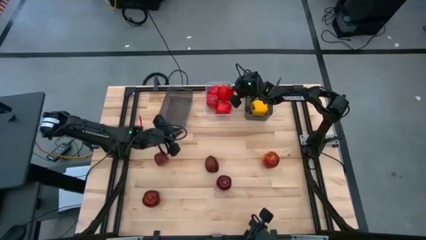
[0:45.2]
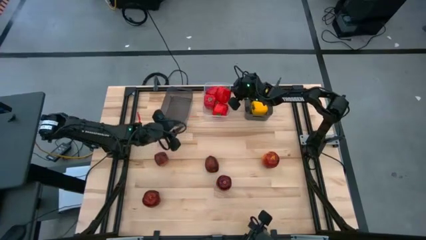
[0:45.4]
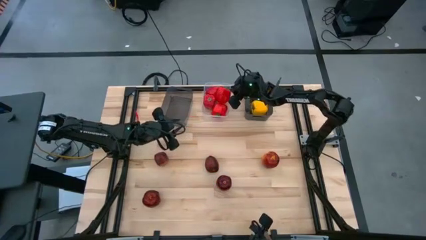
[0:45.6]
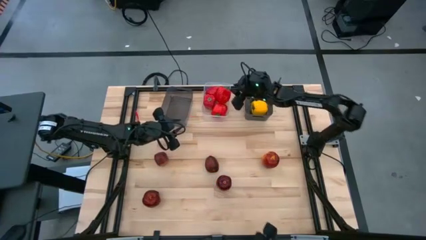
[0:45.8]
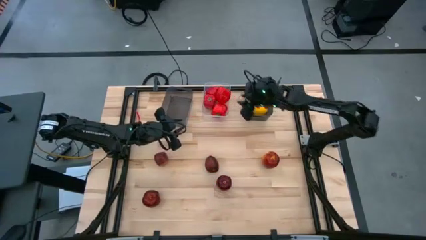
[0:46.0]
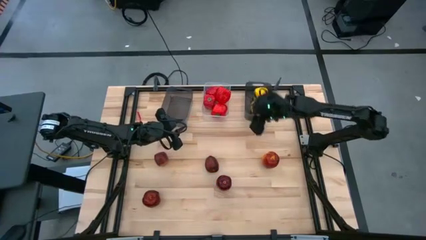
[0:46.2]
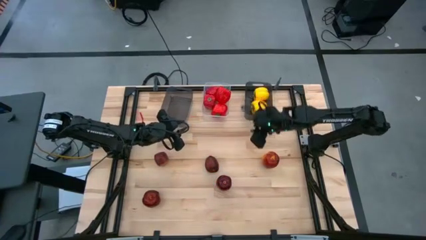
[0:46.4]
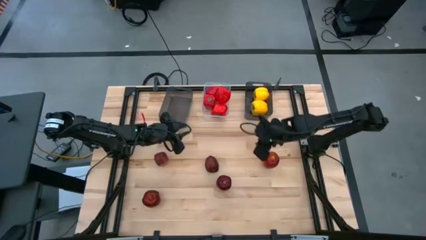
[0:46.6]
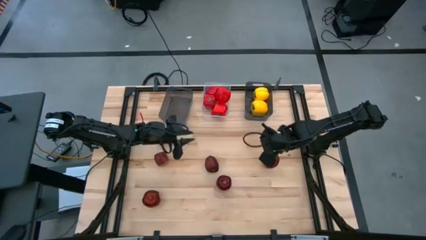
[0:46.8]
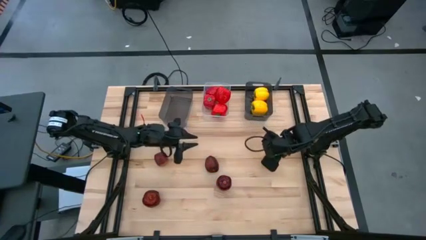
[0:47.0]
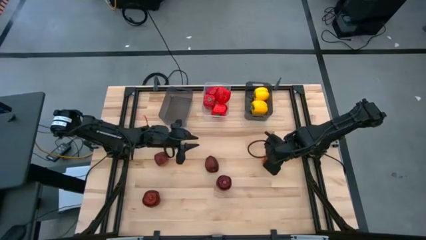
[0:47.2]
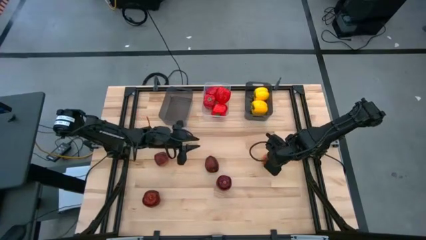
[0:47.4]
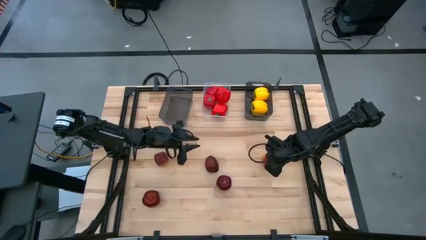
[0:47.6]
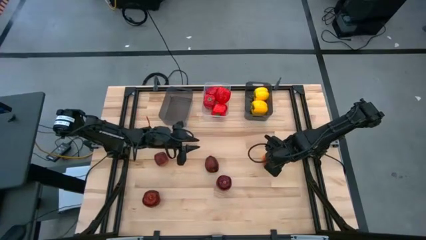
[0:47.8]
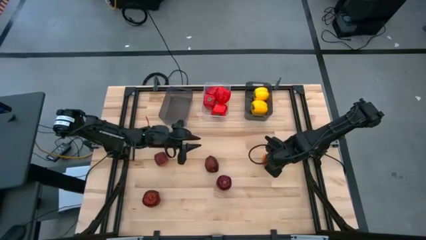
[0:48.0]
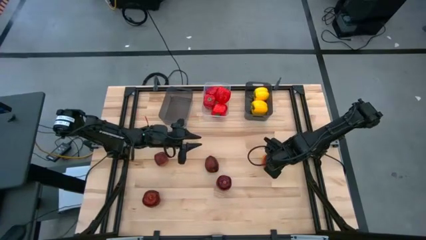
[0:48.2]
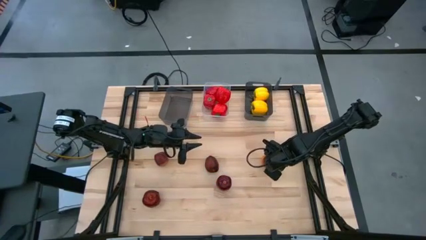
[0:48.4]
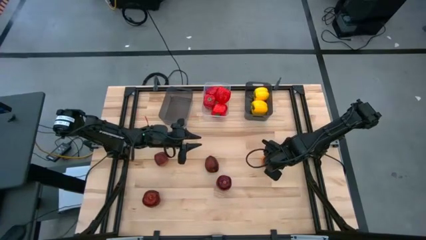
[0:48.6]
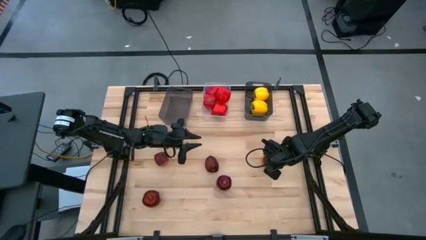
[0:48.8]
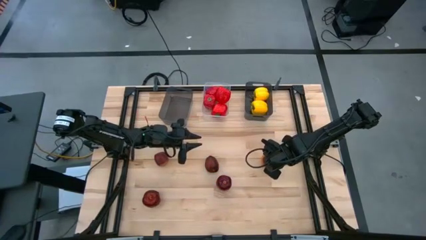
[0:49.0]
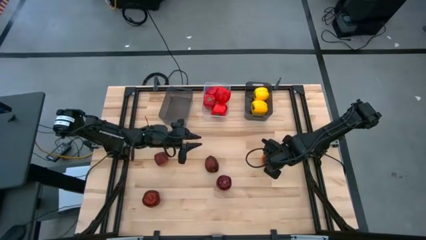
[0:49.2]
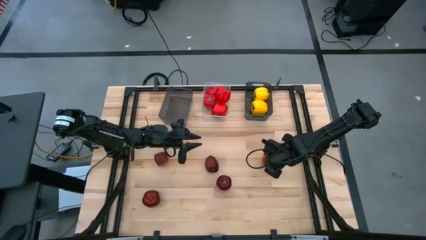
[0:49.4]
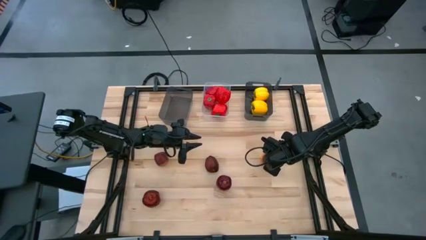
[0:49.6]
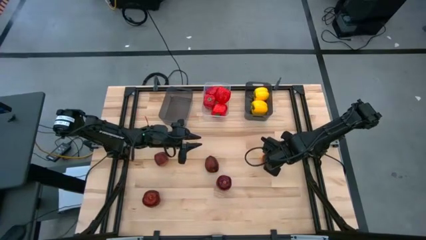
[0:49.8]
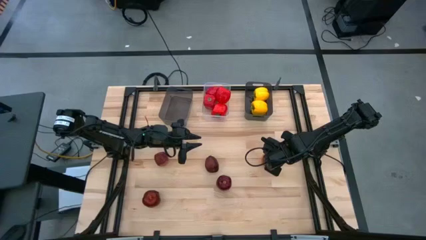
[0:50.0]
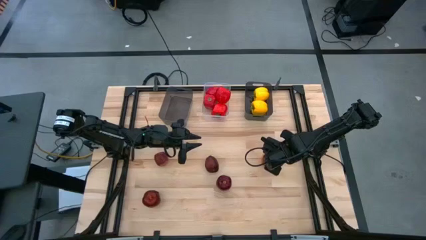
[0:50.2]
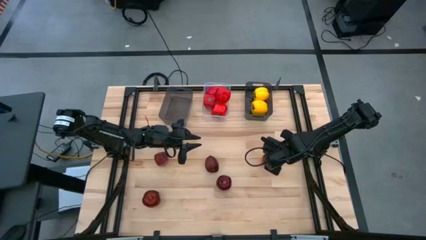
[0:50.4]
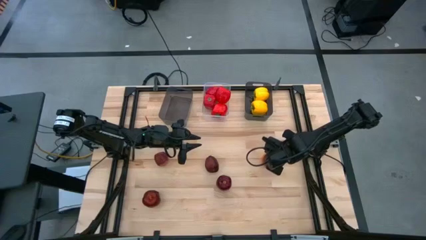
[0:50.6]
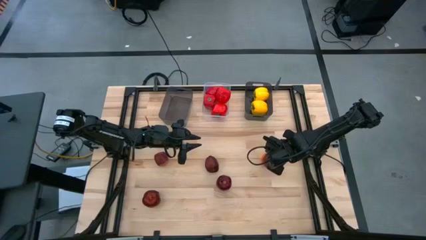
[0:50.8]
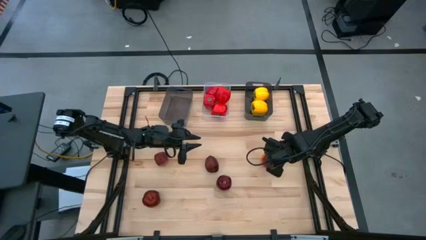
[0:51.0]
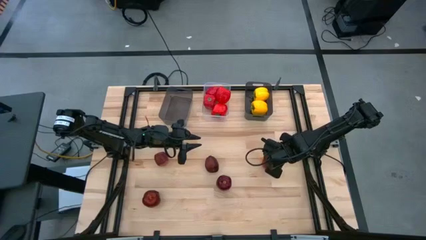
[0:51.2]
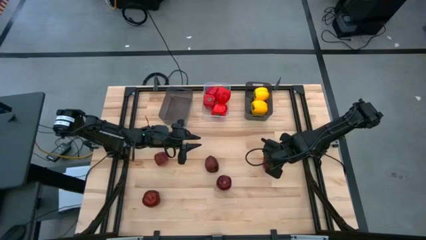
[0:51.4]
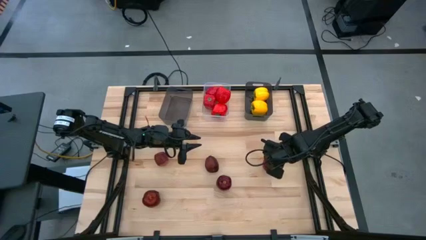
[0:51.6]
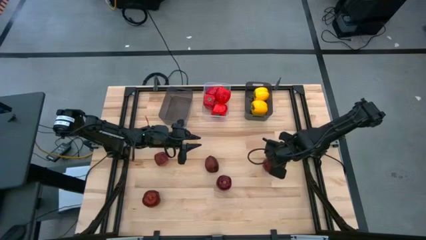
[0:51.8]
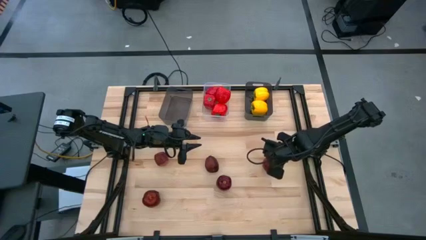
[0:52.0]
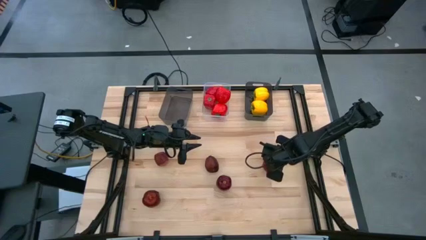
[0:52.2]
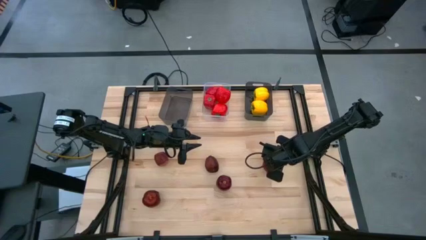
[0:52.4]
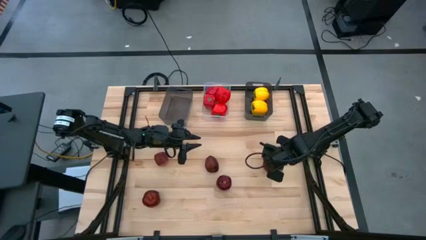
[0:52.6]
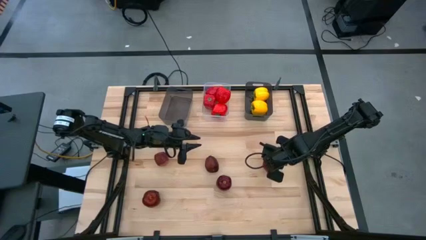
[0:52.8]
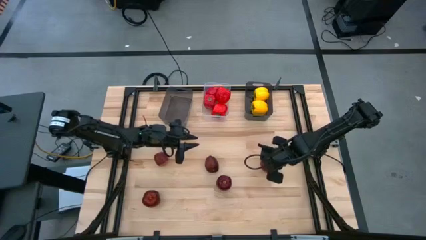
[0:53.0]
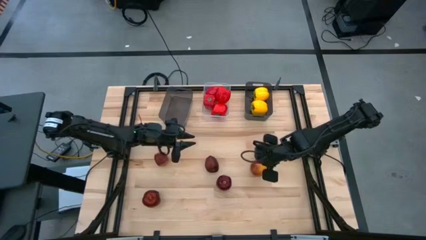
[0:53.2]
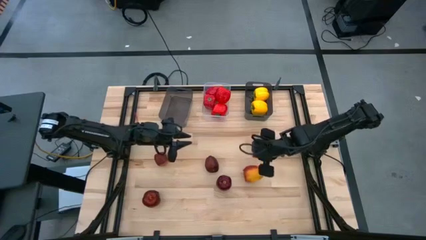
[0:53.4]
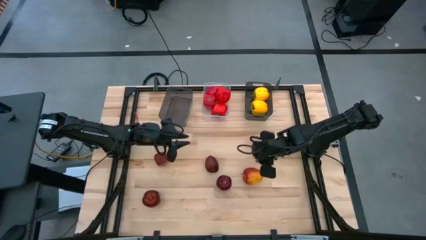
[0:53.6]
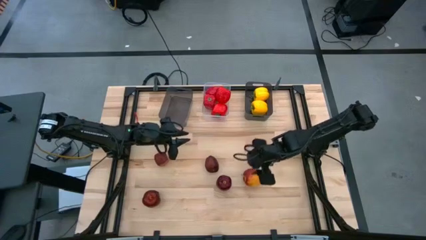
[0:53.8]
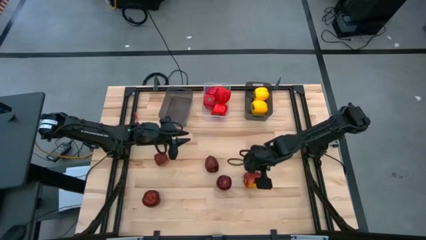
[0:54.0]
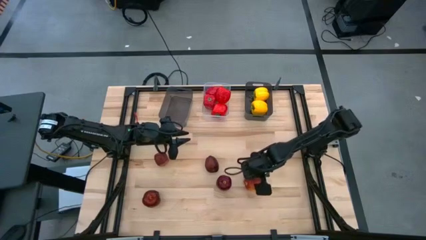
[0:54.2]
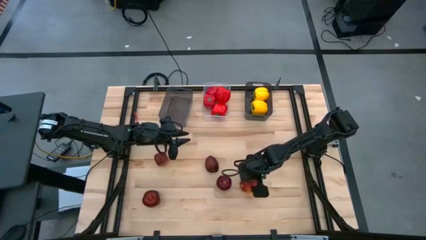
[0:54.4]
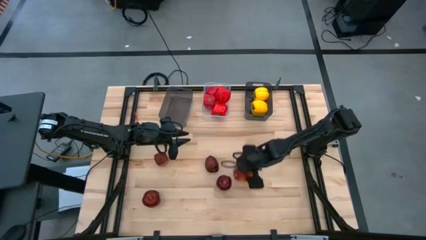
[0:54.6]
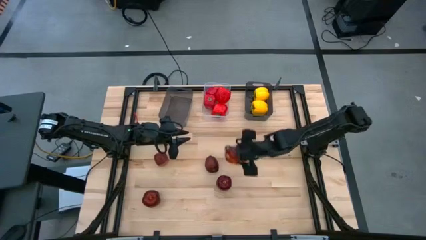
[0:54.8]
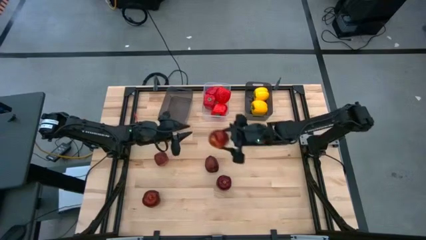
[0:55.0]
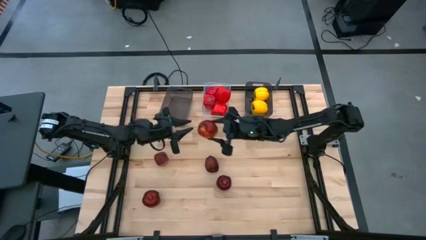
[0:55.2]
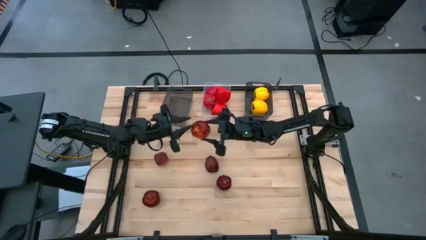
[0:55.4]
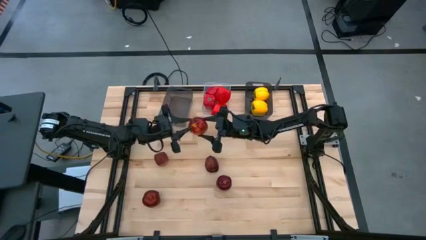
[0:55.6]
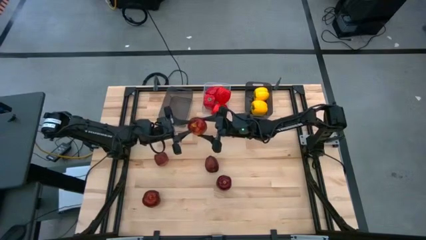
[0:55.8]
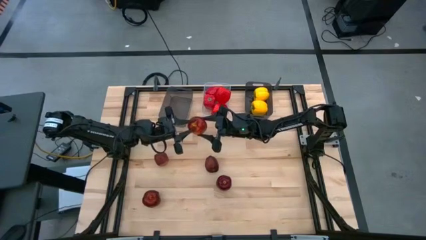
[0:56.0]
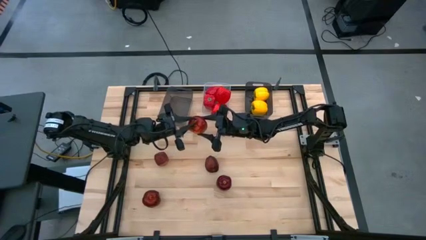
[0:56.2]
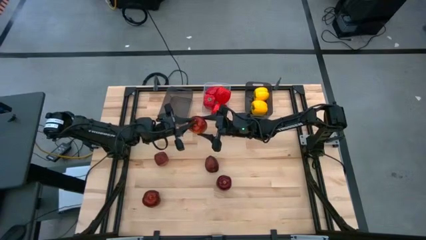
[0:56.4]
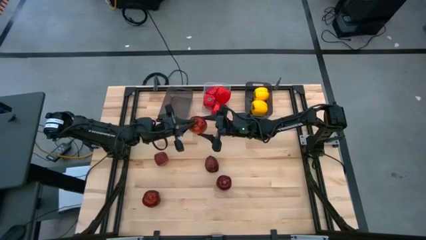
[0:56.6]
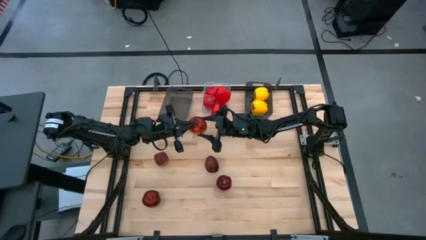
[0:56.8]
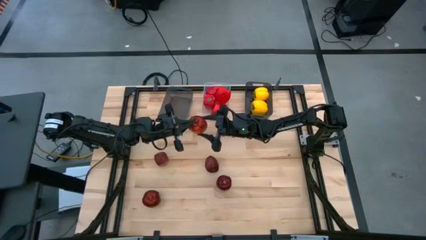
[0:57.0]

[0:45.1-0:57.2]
Task: Sort produce into baskets
Put the top right apple into the left black transparent bin

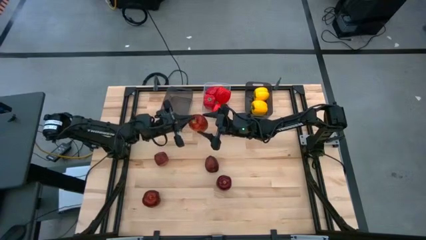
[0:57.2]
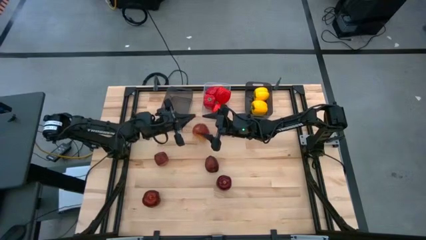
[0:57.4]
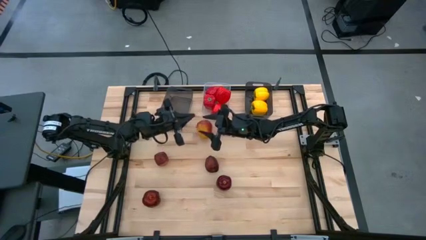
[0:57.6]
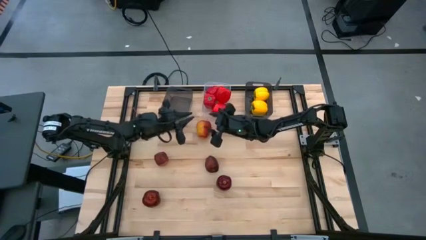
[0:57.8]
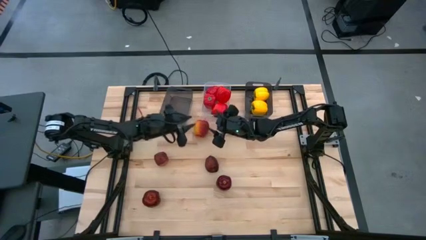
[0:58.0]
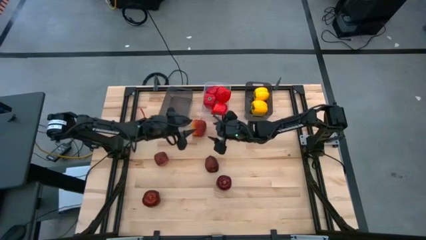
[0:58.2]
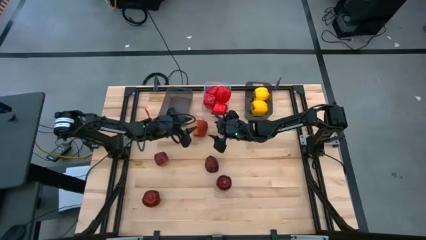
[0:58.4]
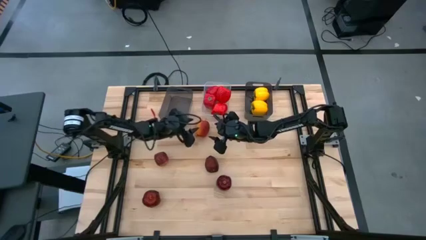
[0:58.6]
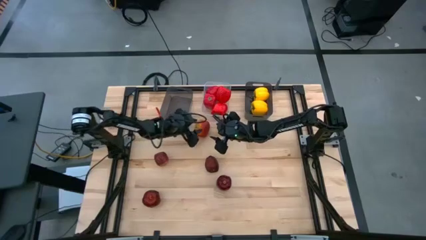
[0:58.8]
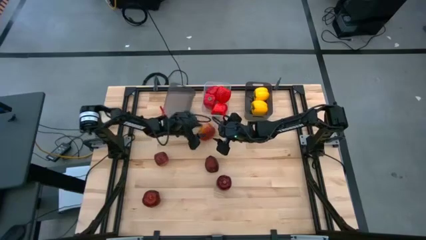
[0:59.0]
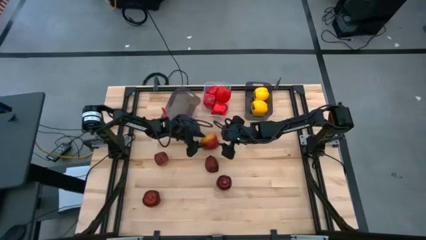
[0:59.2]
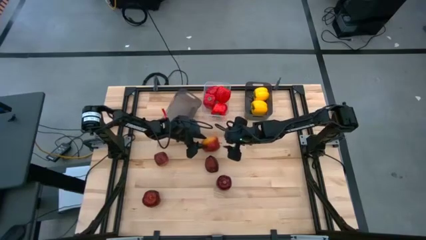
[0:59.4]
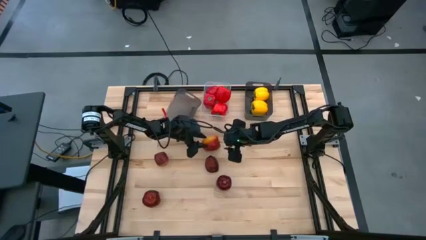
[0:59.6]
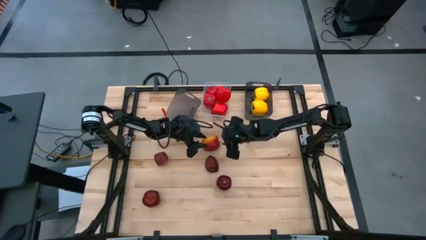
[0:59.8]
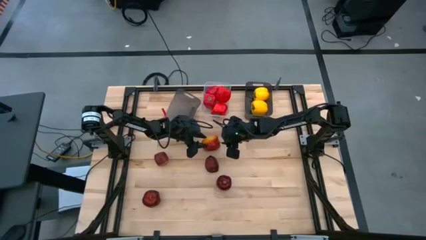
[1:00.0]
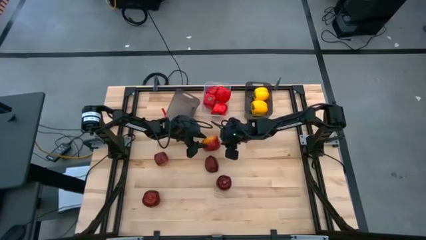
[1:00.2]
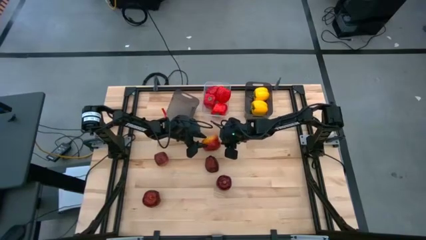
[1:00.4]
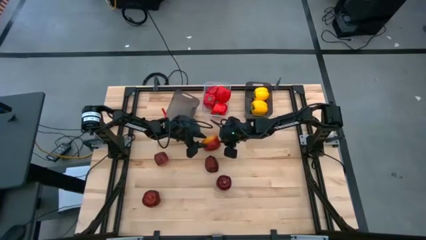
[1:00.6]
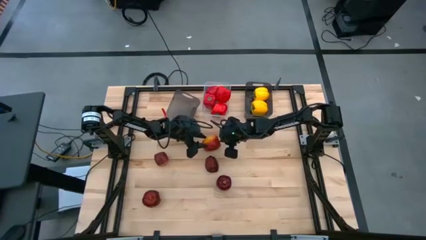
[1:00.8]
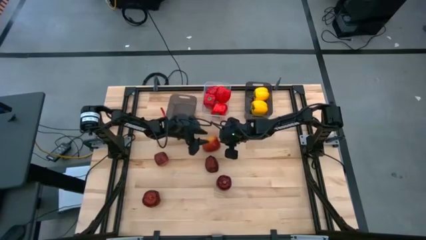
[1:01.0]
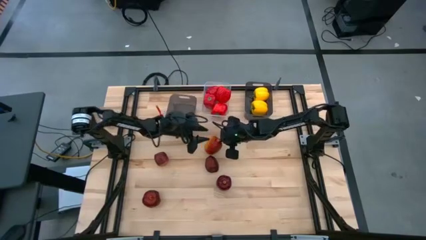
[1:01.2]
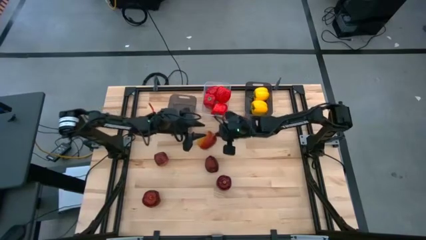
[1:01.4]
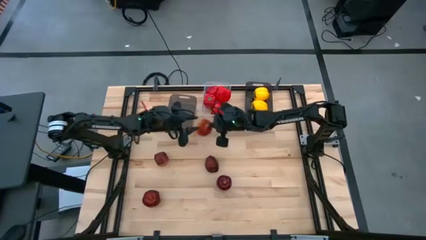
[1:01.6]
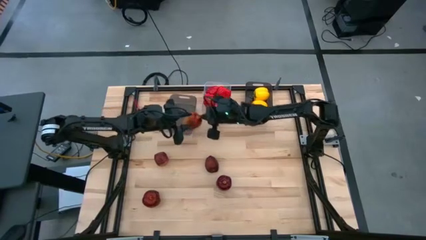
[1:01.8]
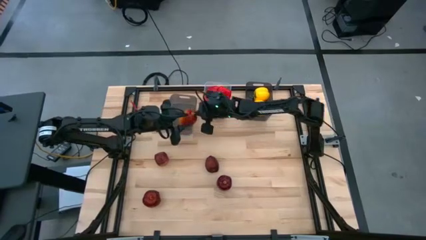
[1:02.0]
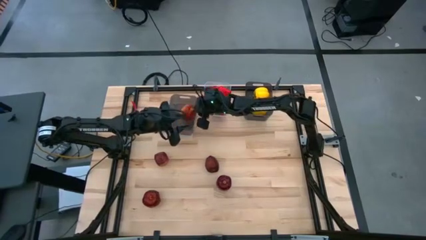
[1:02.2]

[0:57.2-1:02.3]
Put the top right apple into the left black transparent bin

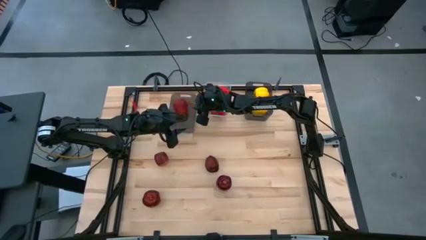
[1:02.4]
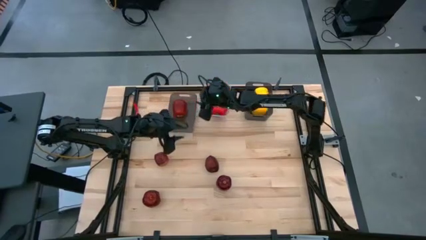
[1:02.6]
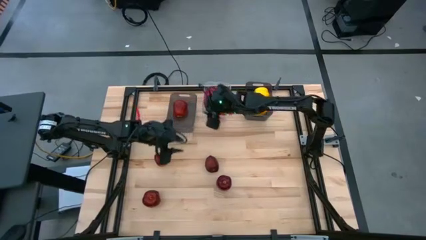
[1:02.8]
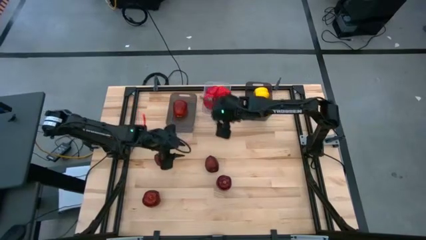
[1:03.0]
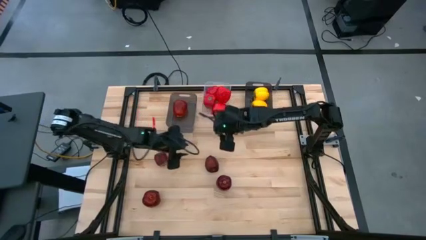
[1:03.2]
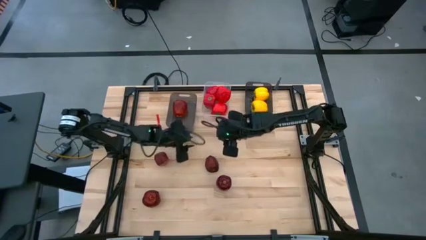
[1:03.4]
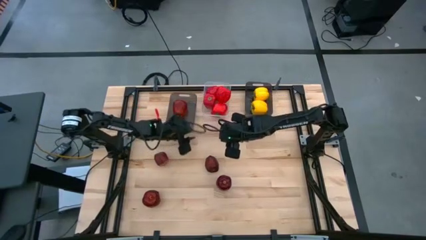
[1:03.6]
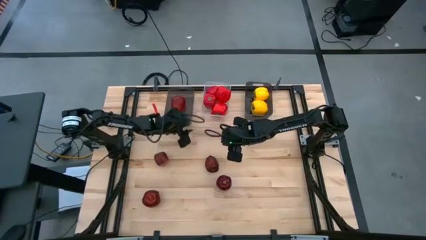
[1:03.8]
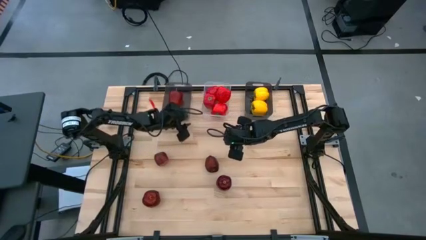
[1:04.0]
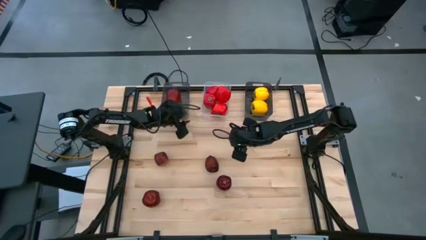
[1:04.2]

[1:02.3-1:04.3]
Adjust the left black bin
